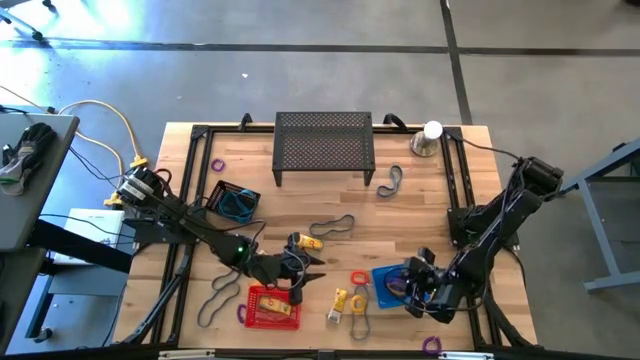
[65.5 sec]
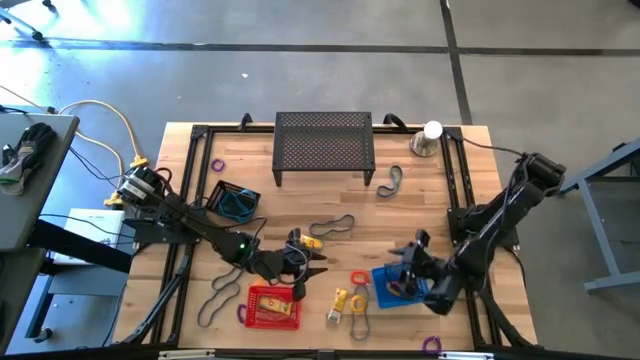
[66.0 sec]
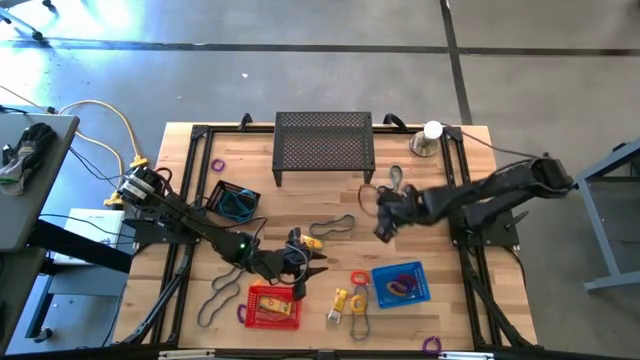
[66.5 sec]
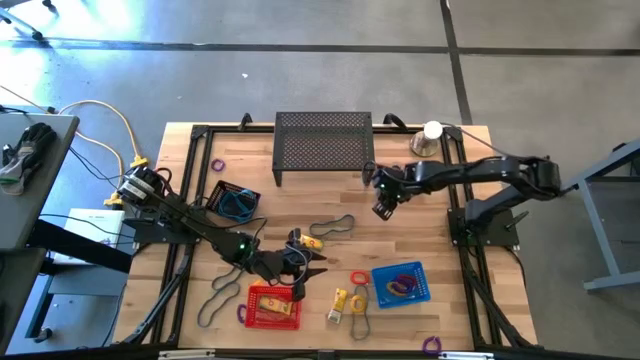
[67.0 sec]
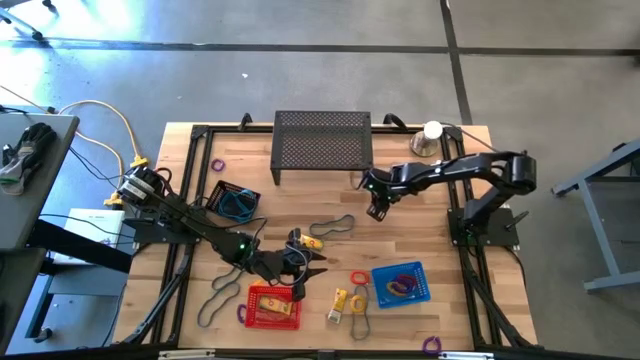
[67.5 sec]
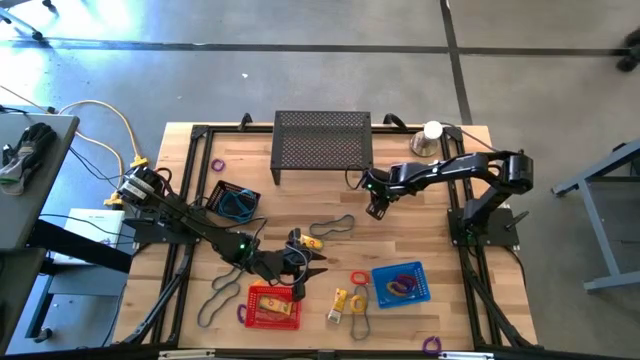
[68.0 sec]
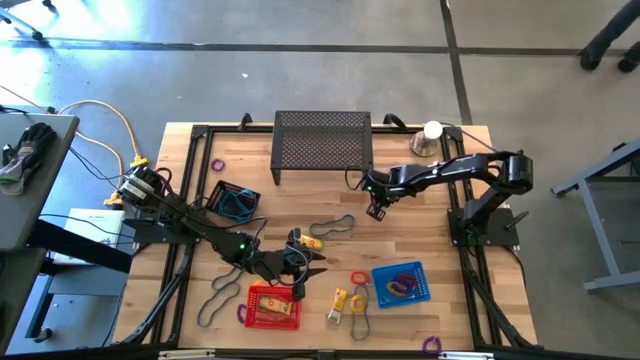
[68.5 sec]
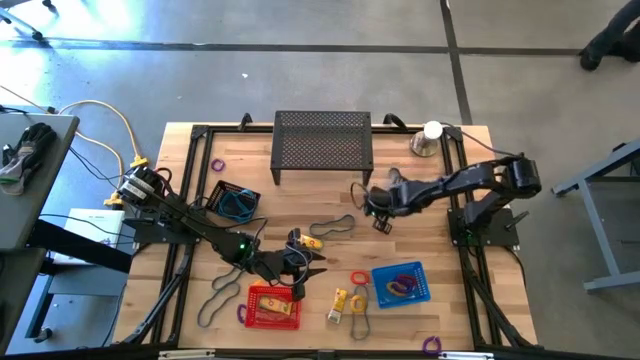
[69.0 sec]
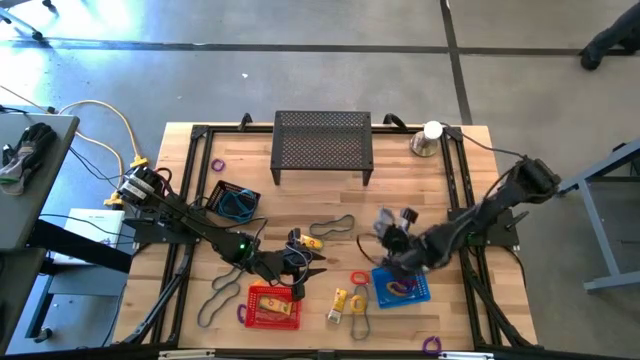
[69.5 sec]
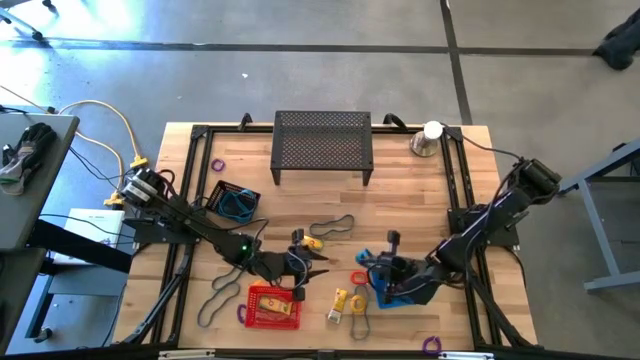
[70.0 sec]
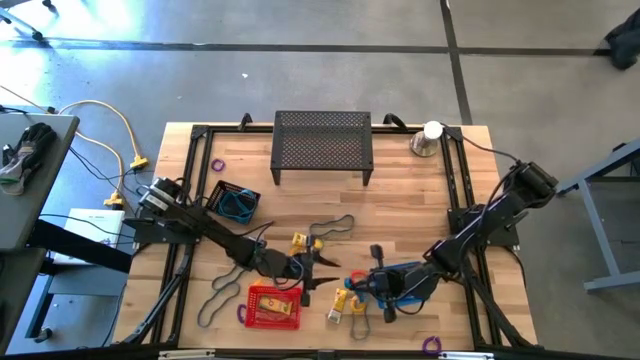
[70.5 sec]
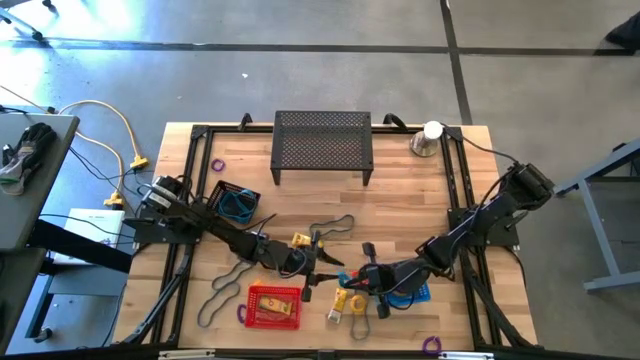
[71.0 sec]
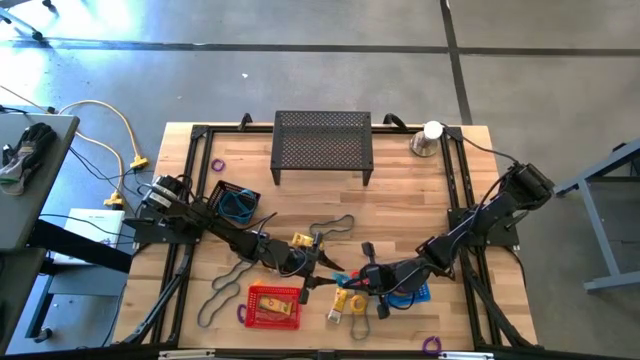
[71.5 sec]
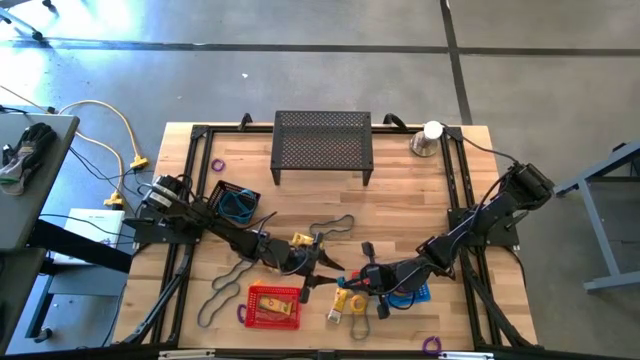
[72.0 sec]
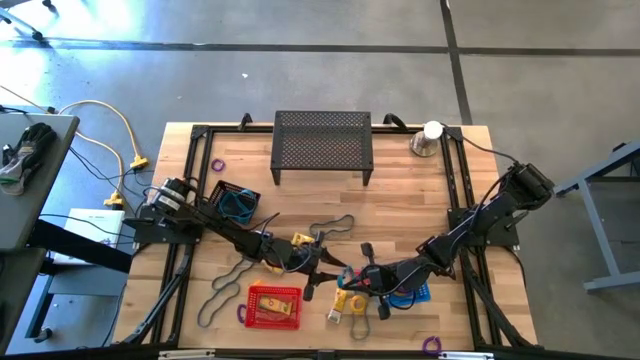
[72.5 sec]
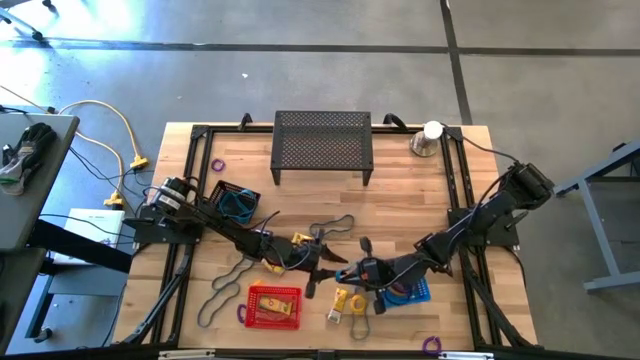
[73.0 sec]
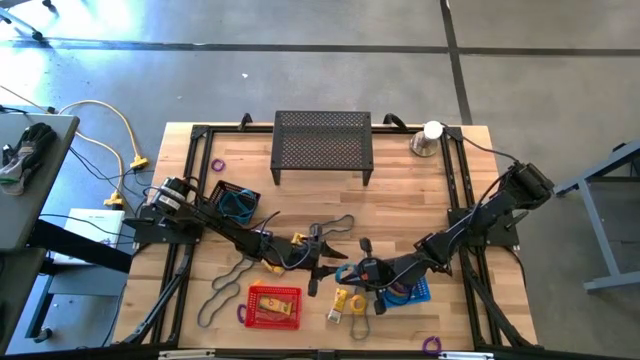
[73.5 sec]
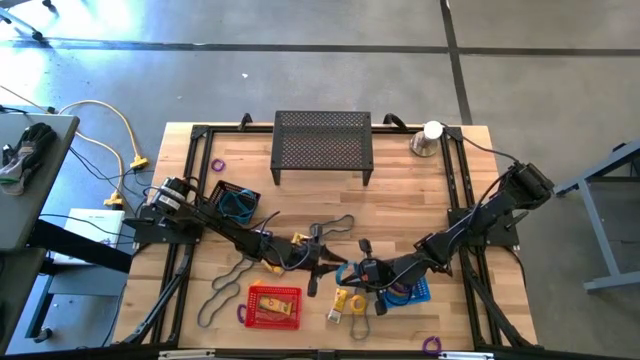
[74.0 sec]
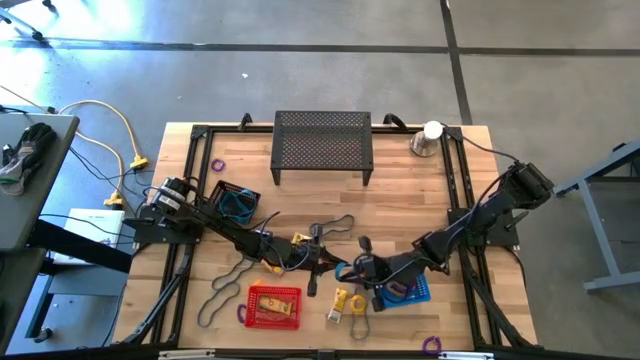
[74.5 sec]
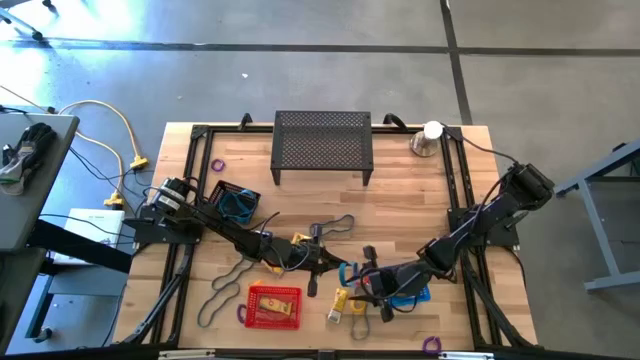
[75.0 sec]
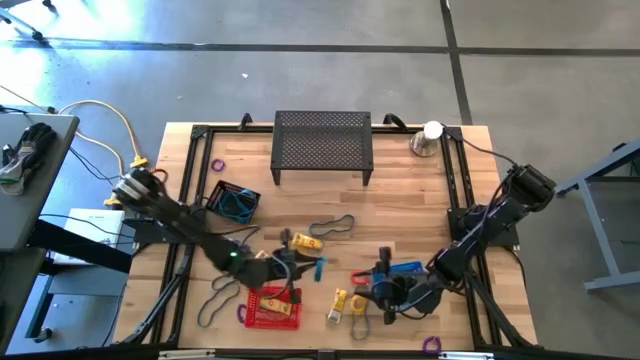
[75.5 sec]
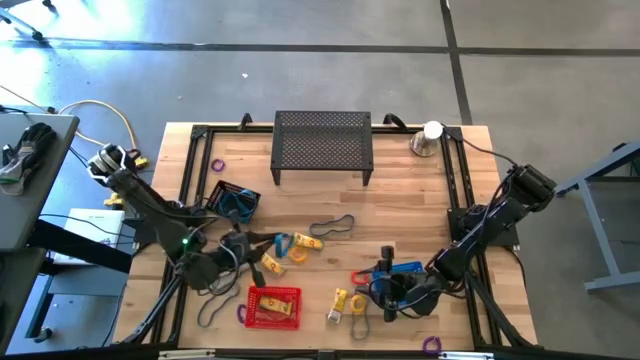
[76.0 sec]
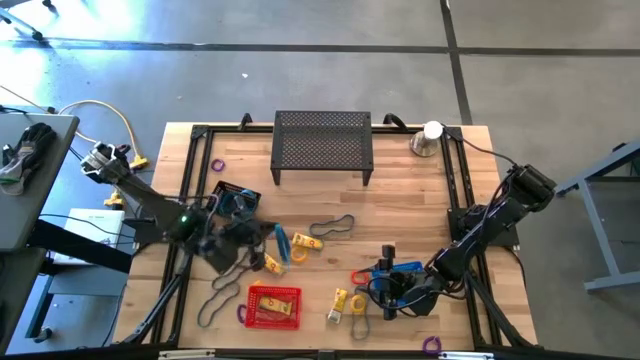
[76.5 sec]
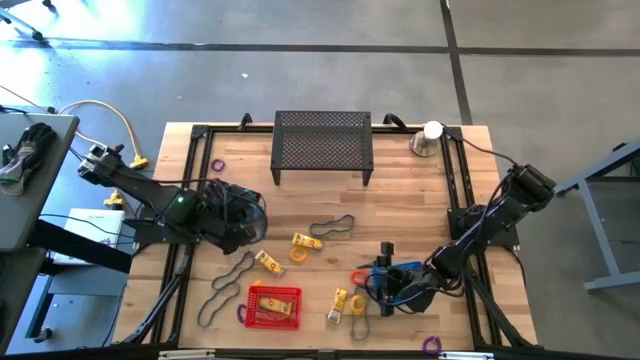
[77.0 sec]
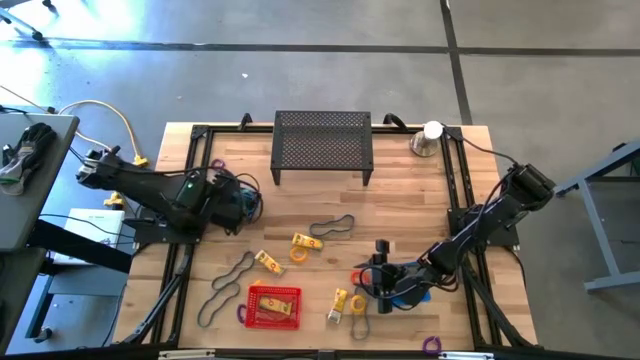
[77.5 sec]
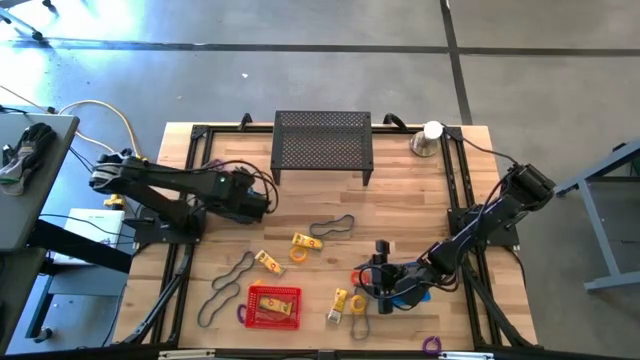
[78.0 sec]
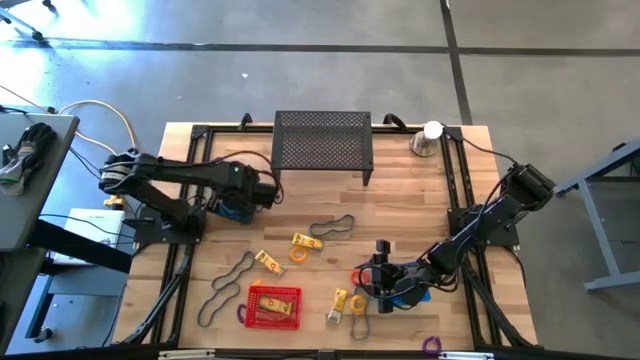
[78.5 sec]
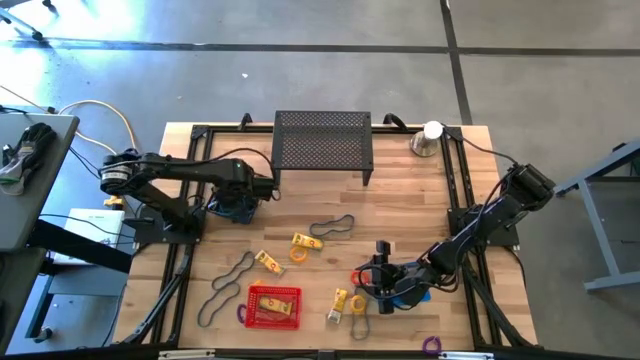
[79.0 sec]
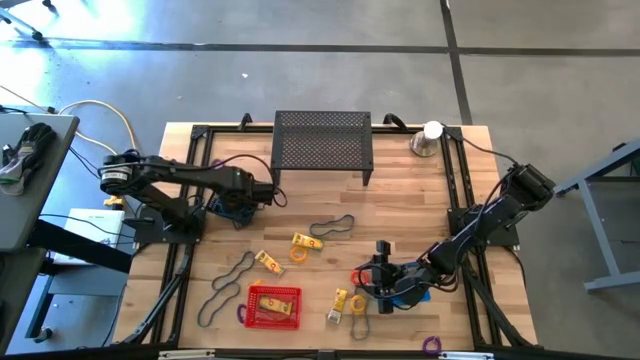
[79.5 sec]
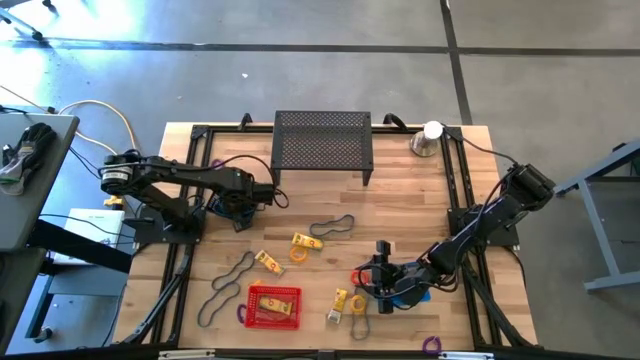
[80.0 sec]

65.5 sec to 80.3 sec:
Task: Pick & Place Office Desk Supplies
Put the blue rubber band into the black bin

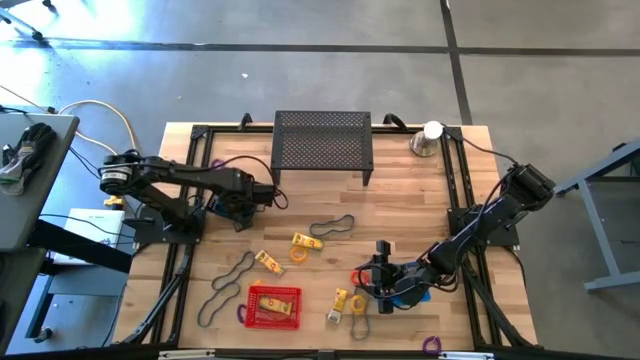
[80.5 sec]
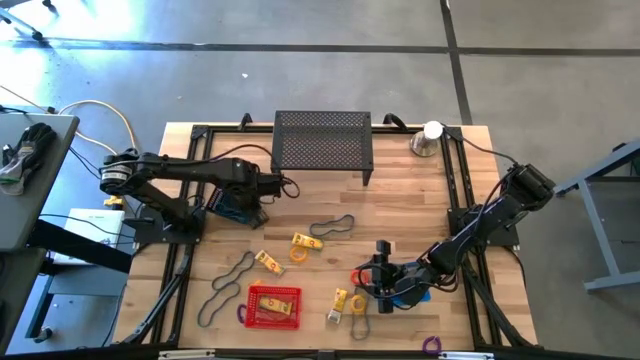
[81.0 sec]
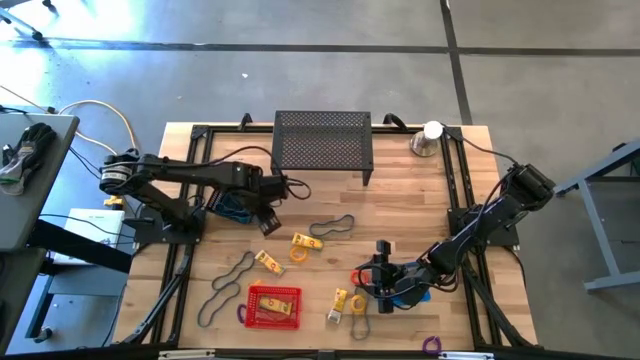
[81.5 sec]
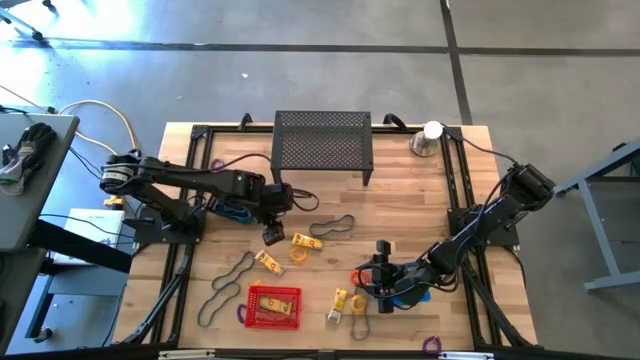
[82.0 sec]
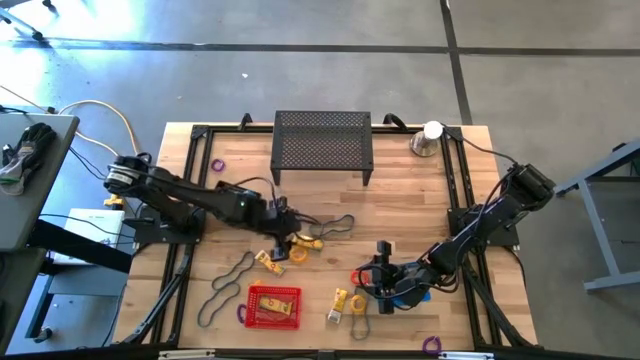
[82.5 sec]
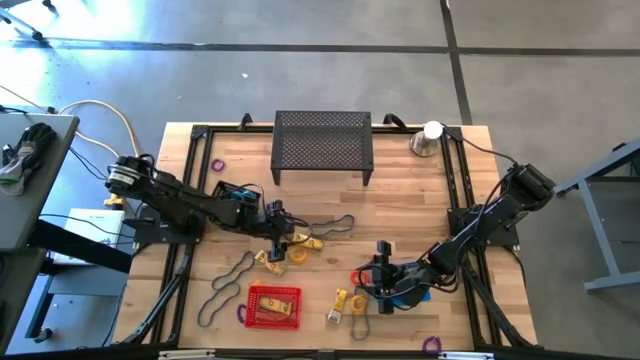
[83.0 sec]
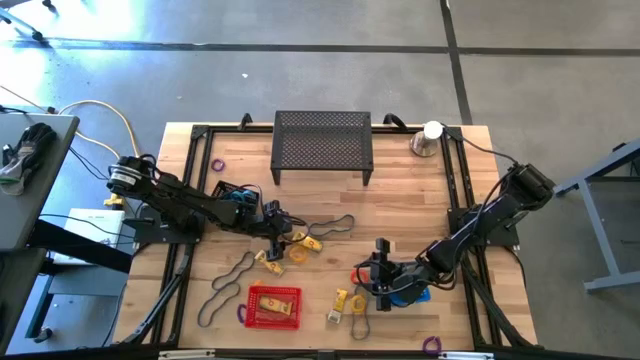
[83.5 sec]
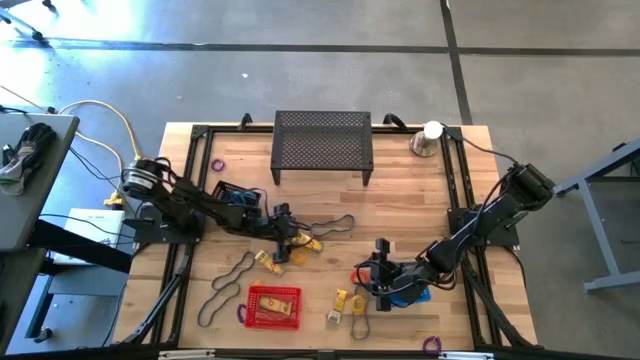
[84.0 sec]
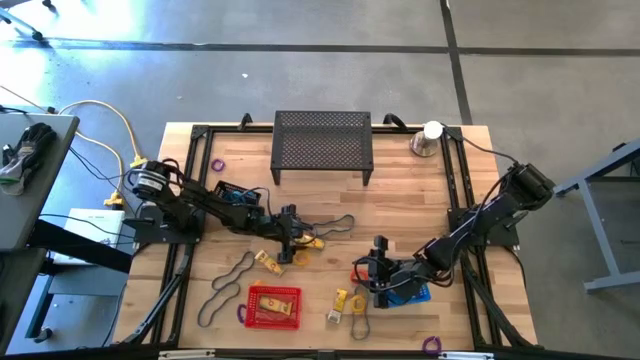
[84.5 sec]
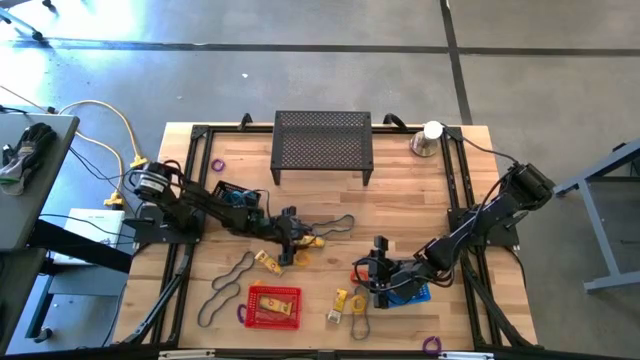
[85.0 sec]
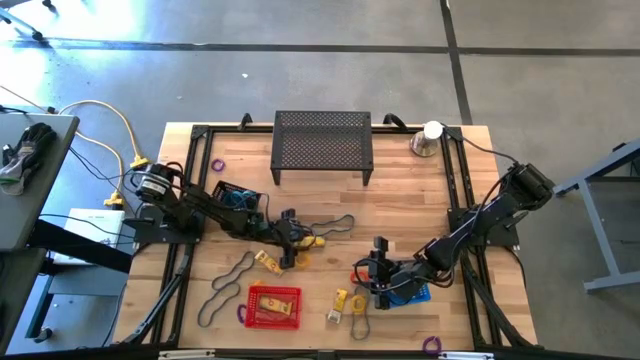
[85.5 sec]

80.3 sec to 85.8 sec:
Put the yellow crayon box into the red bin

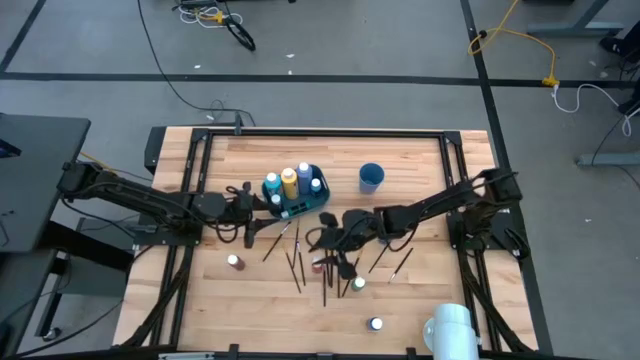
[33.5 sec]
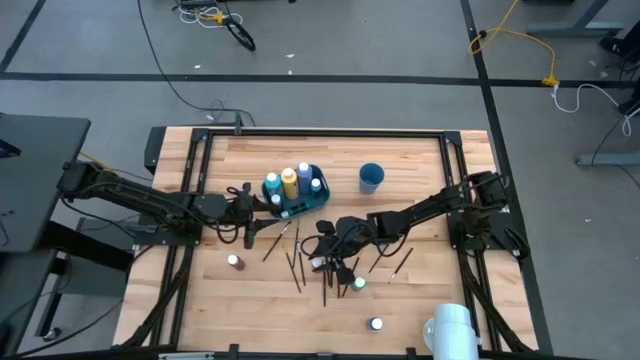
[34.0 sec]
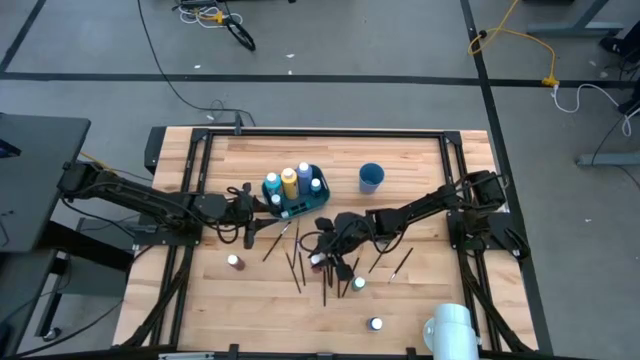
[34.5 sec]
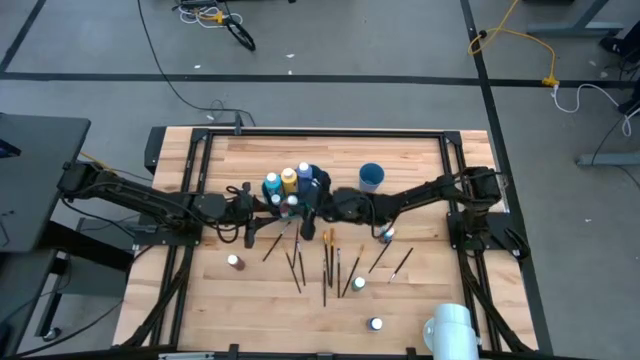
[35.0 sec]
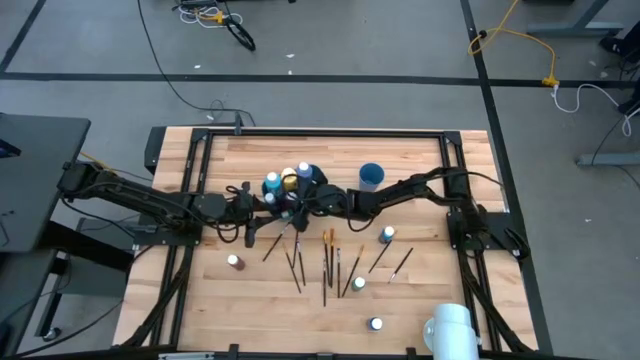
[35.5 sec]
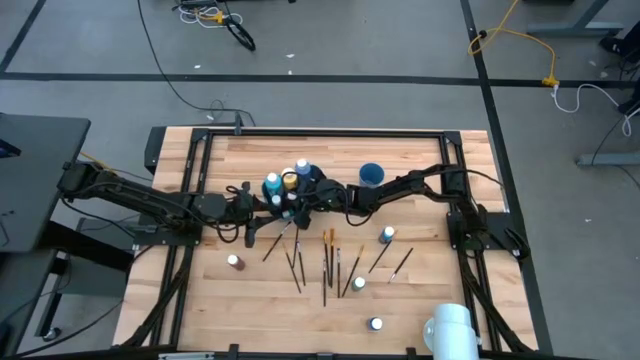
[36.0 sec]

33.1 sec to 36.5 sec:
Task: Pick & Place Paint Supplies
Put the red paint bottle into the blue bin
